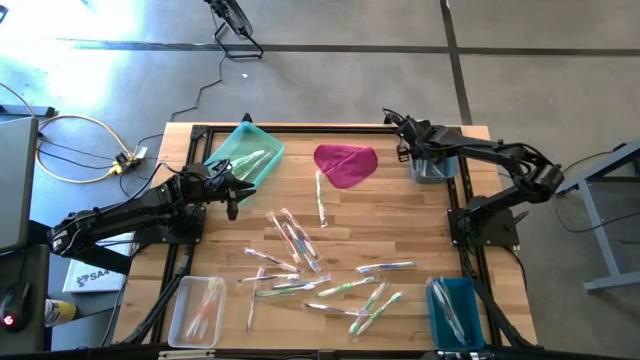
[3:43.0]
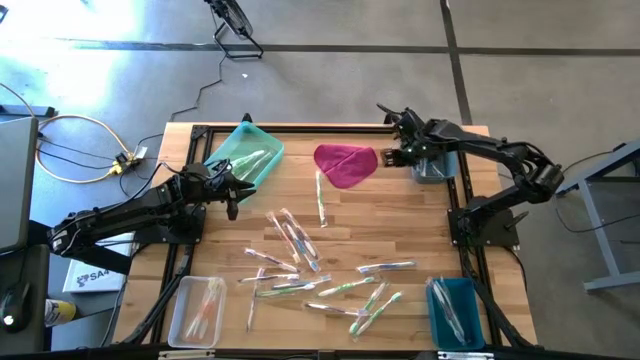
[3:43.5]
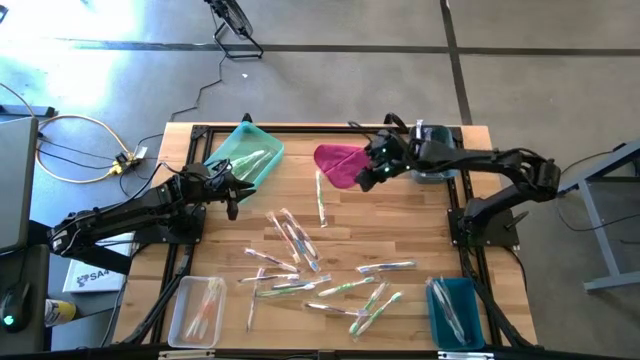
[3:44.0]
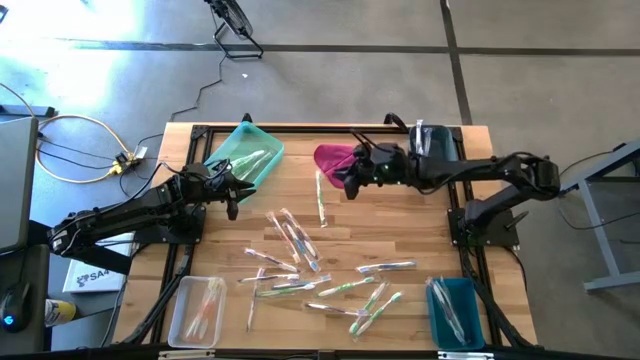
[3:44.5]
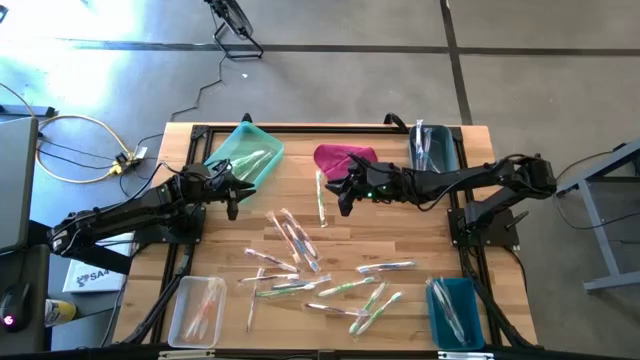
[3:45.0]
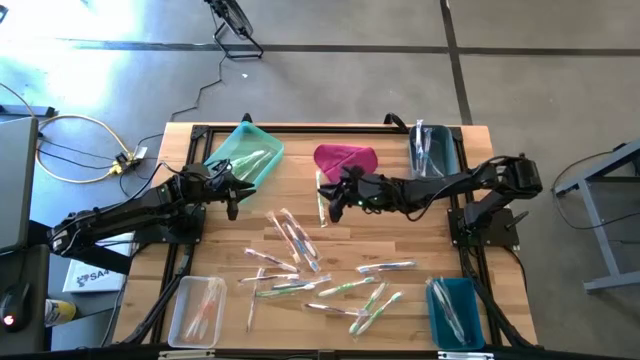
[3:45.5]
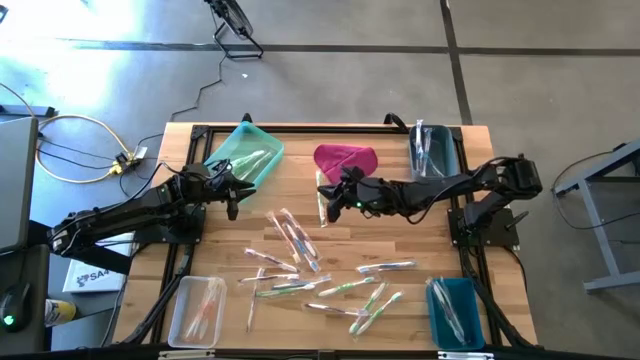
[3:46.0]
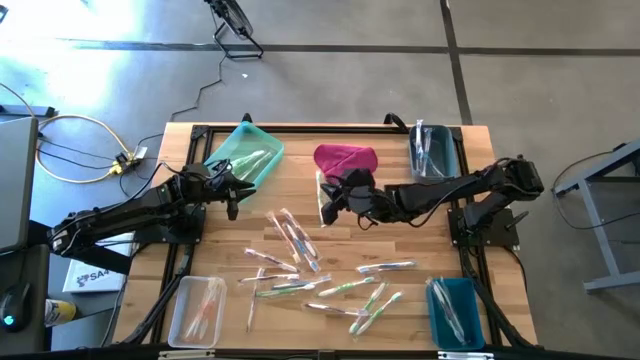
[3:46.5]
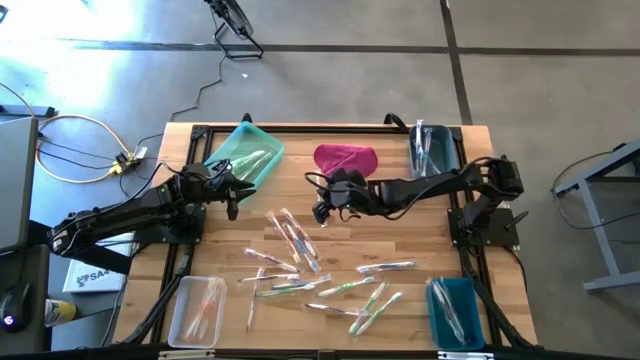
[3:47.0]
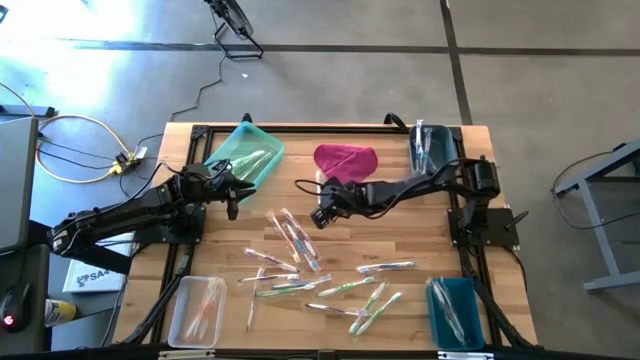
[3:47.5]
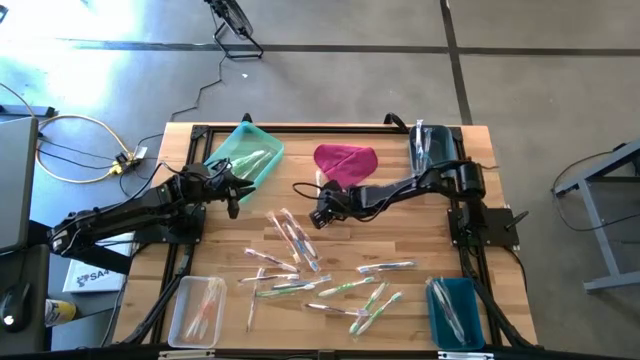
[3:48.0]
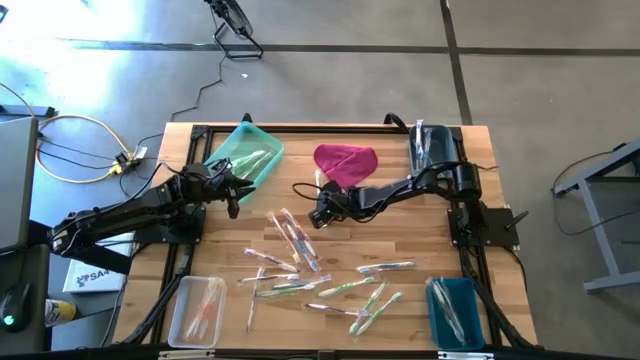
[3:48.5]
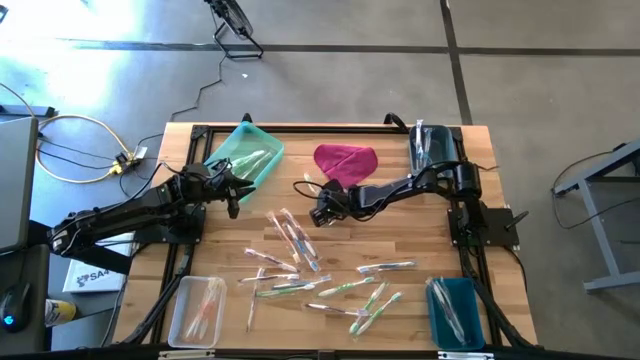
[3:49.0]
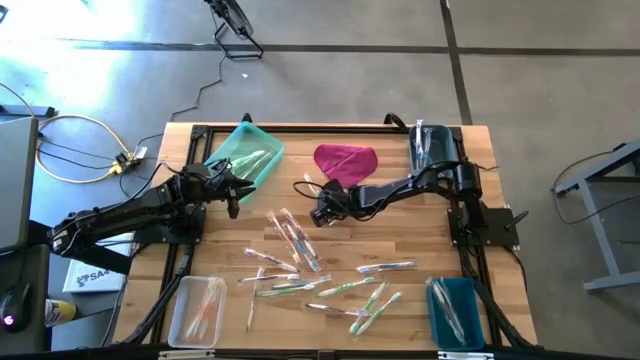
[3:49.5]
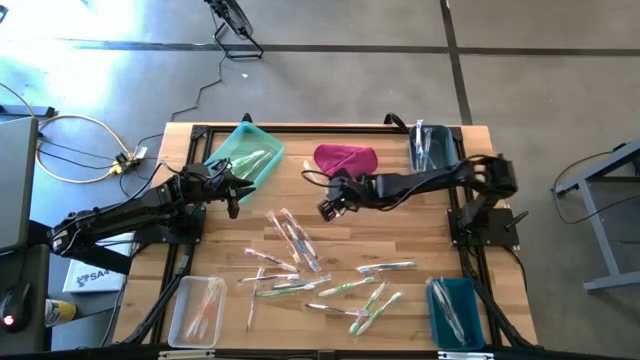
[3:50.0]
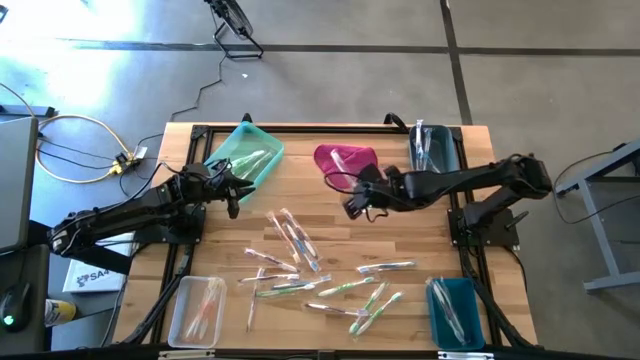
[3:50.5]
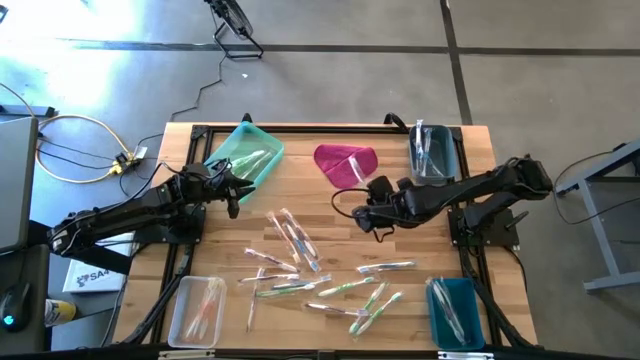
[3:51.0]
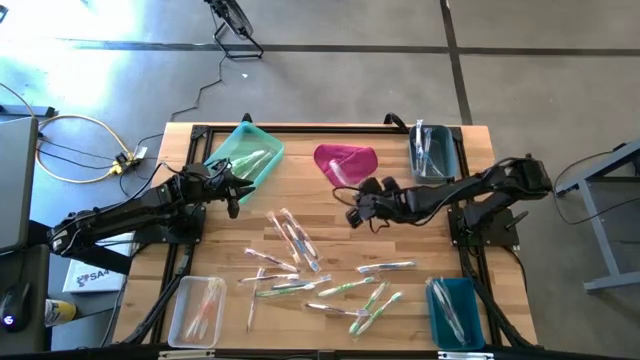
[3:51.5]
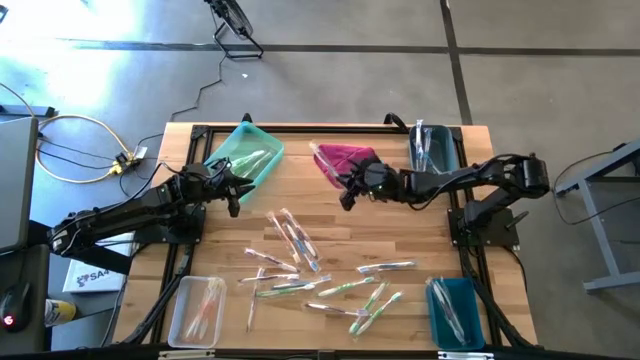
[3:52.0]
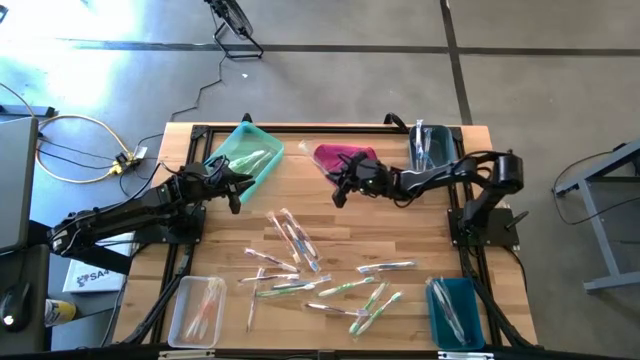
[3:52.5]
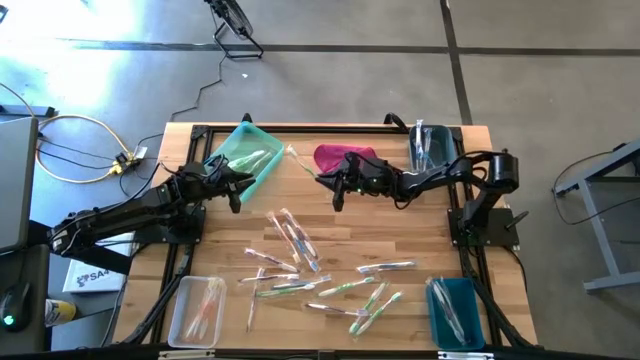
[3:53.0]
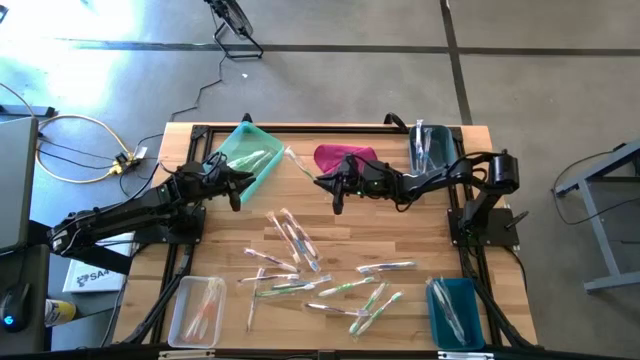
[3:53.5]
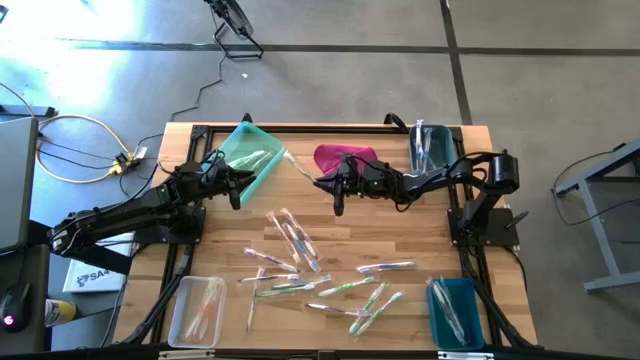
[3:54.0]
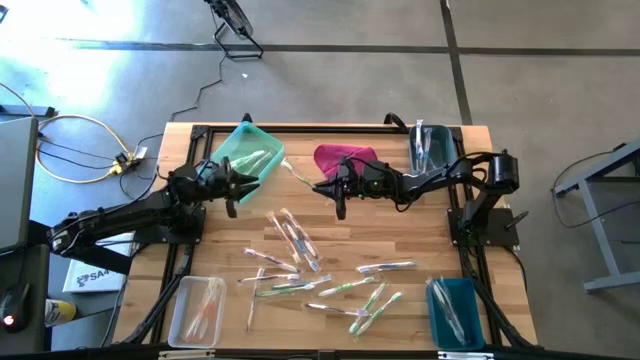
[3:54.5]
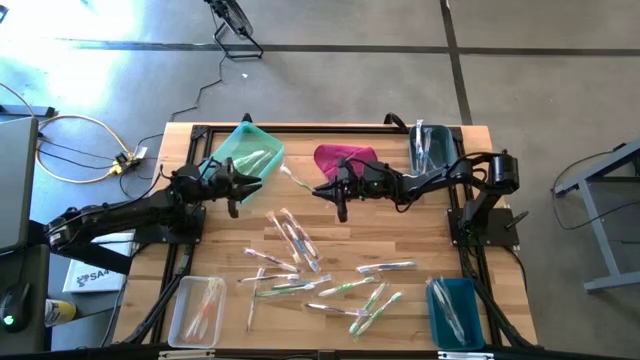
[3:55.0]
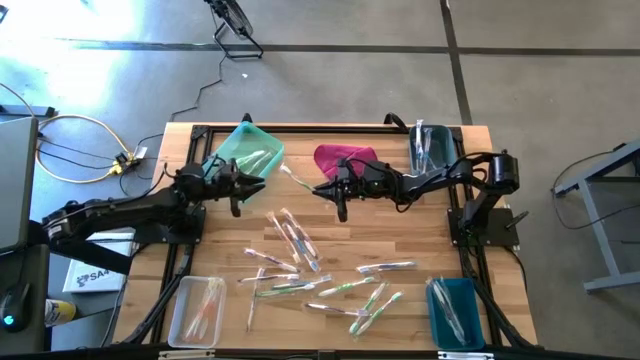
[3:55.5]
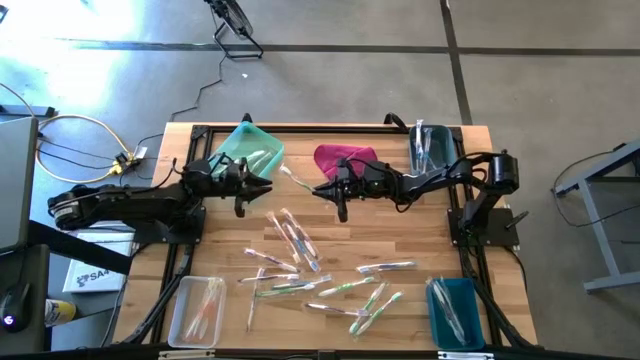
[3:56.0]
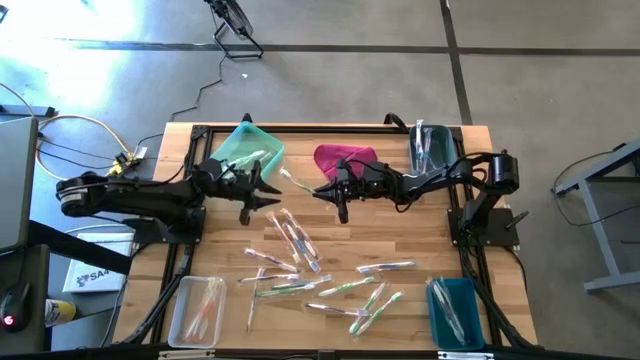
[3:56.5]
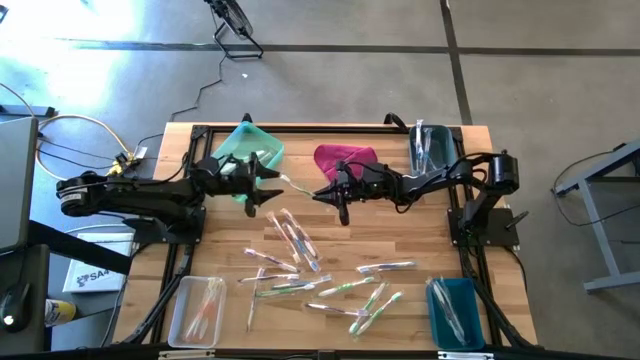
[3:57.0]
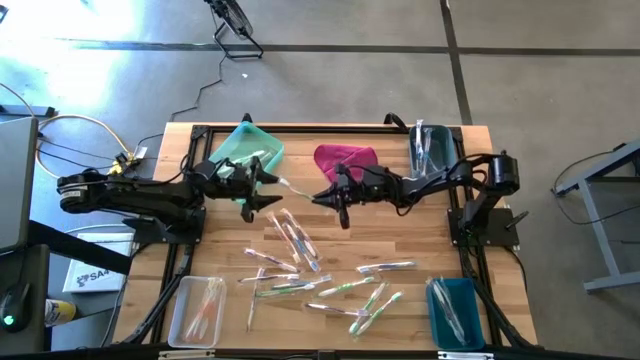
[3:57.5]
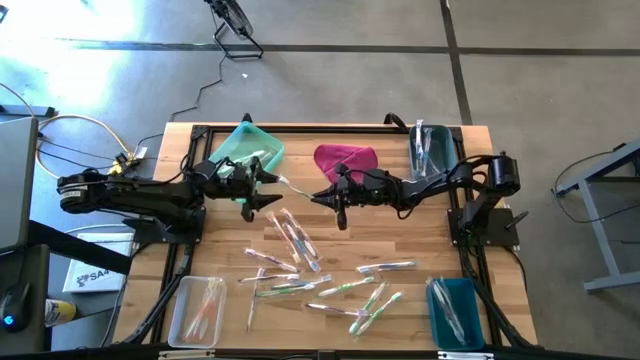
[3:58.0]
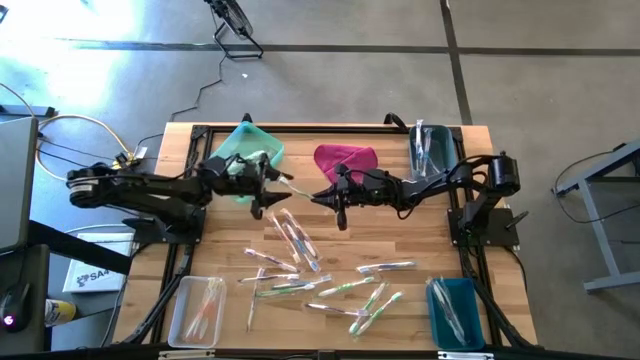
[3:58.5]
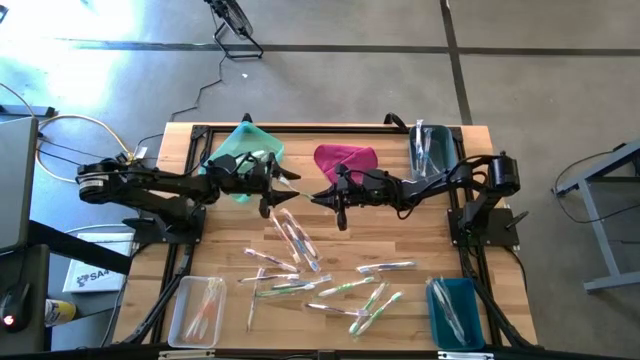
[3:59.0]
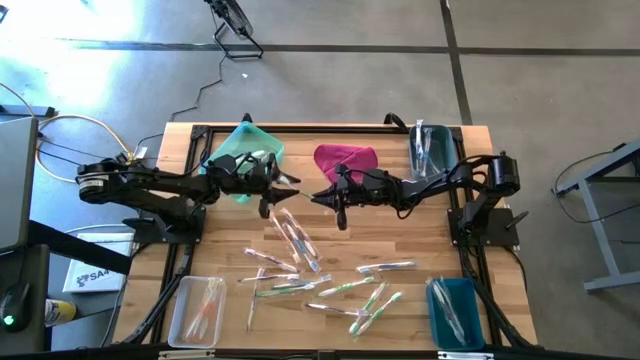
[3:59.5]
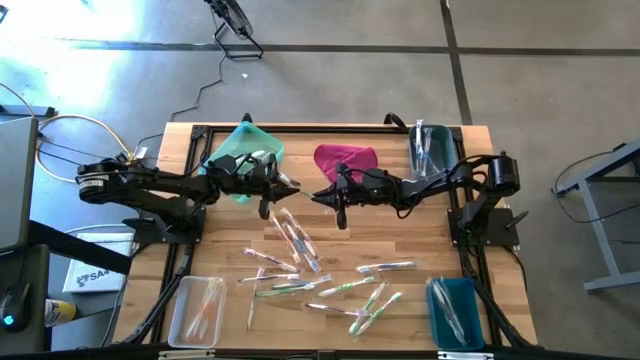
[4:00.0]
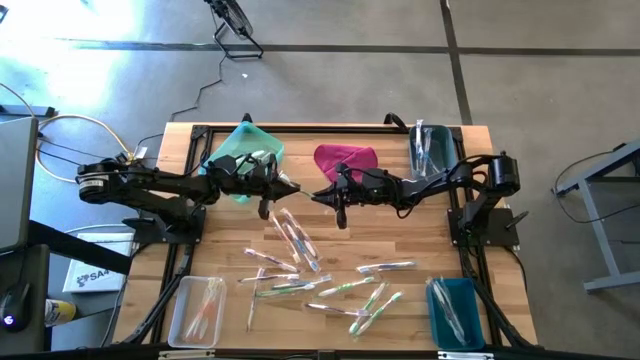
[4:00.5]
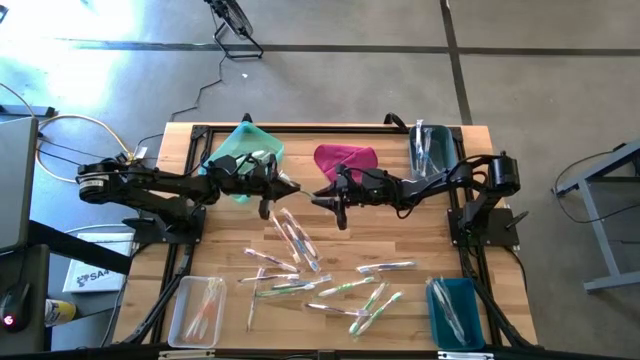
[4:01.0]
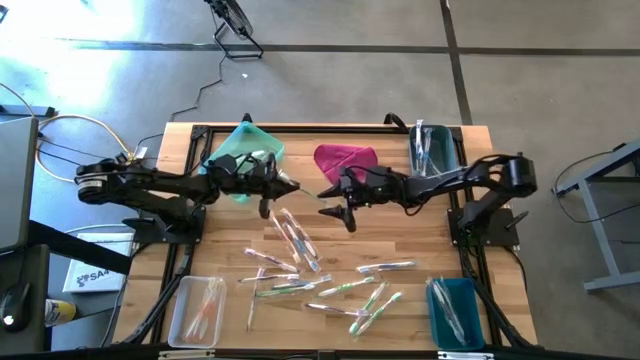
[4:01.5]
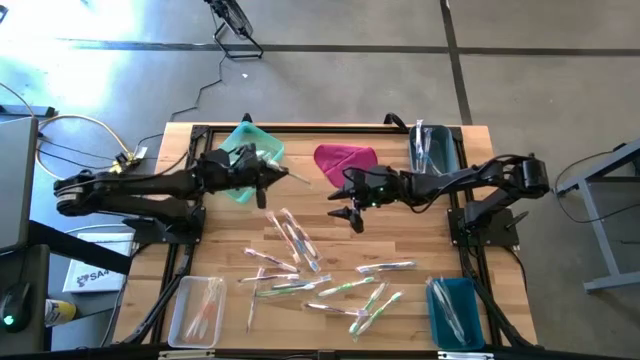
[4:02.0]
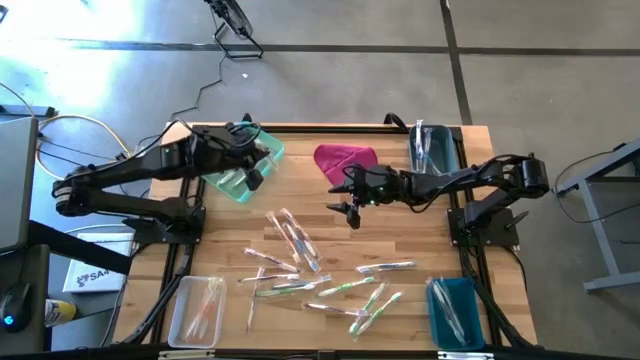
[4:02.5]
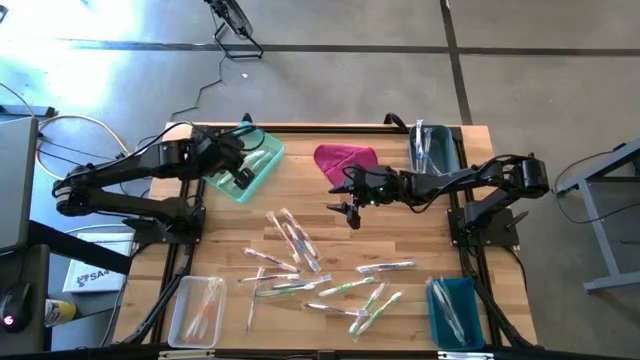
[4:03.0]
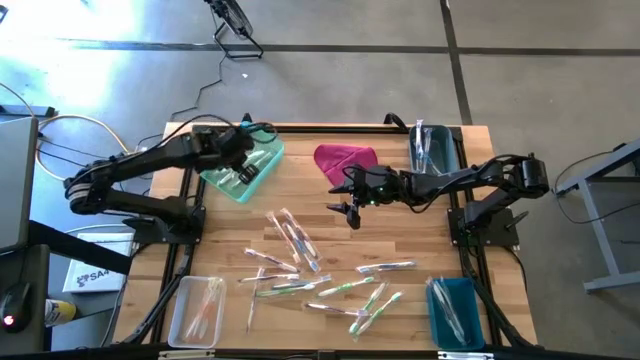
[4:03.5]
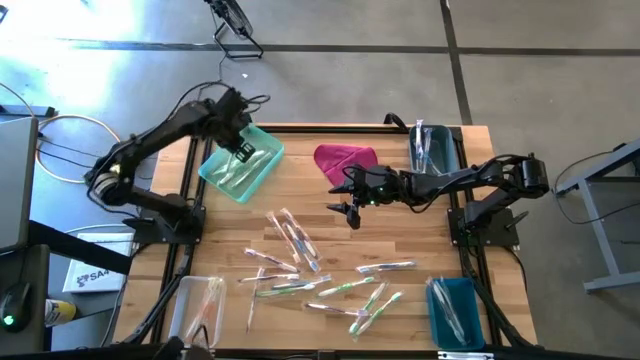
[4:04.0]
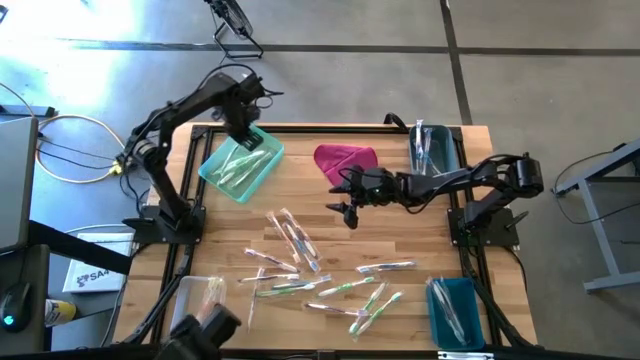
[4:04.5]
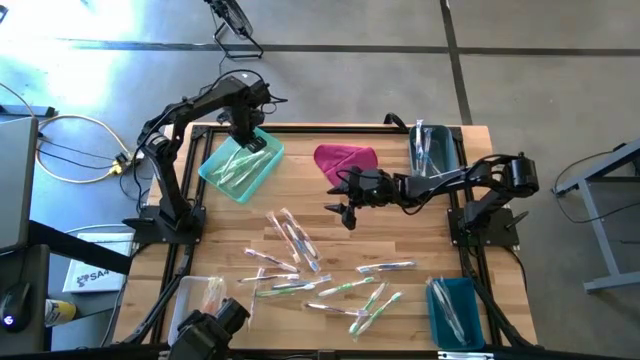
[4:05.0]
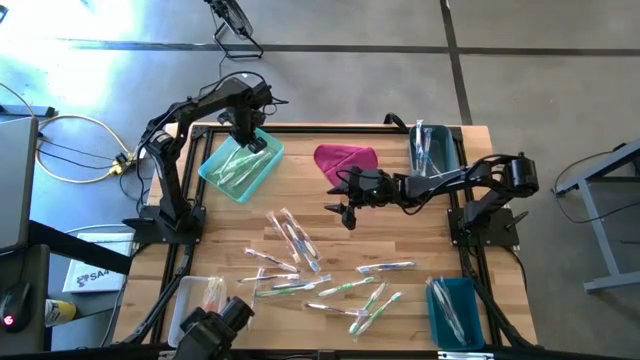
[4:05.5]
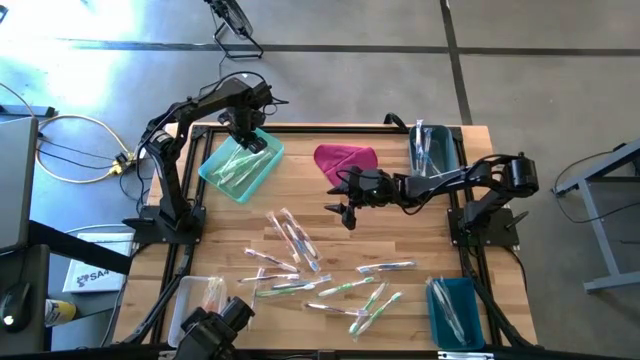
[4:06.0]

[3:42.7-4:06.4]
Task: Pick & Place Toothbrushes
Put the green toothbrush to the green bin
